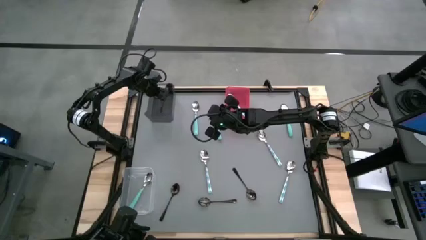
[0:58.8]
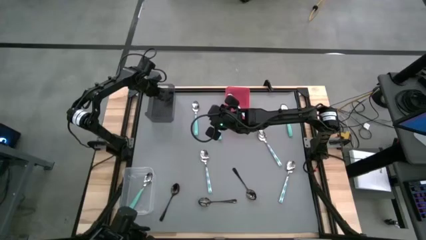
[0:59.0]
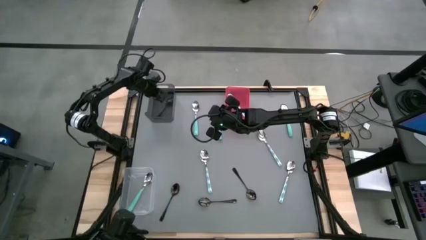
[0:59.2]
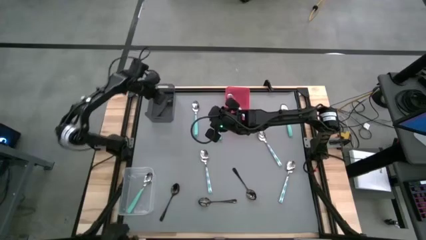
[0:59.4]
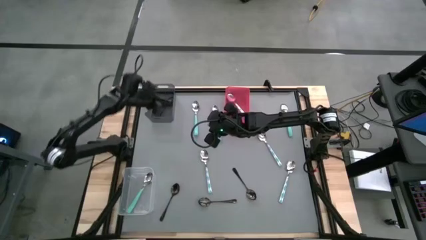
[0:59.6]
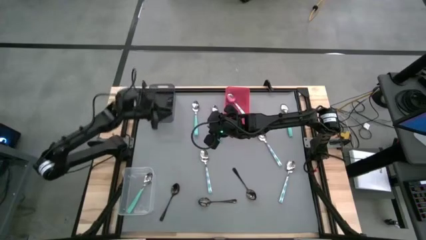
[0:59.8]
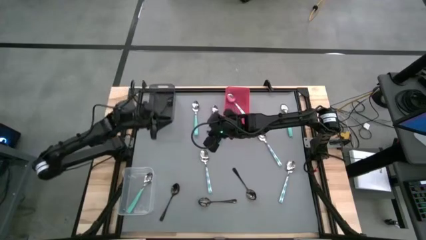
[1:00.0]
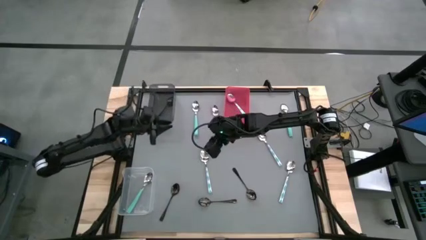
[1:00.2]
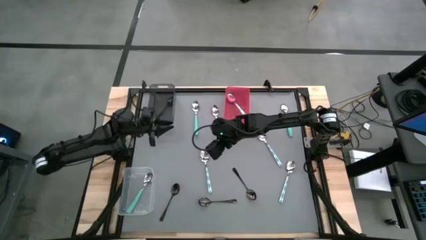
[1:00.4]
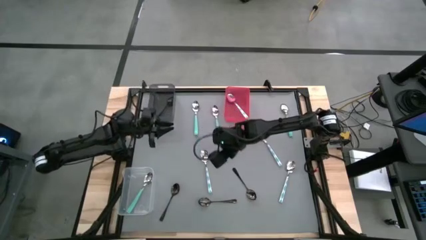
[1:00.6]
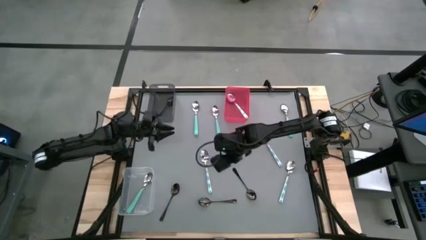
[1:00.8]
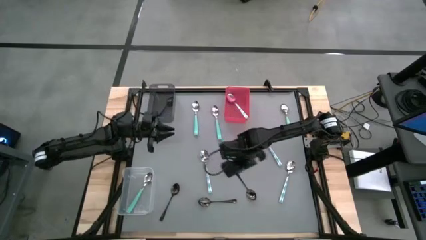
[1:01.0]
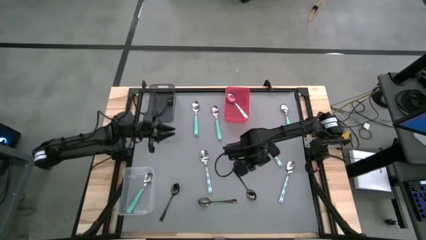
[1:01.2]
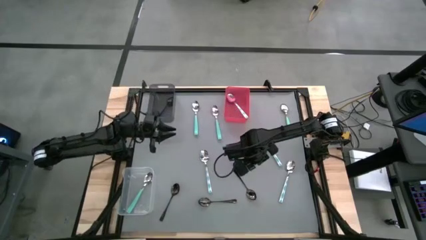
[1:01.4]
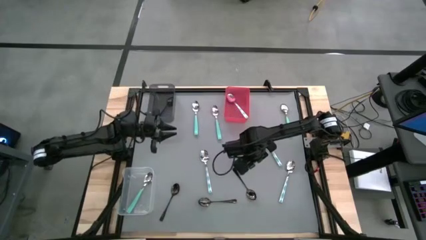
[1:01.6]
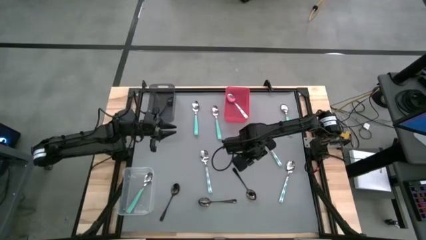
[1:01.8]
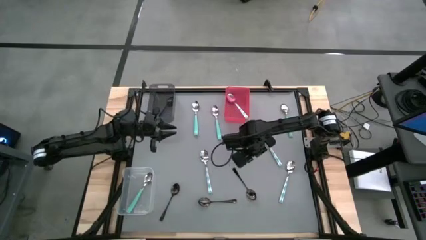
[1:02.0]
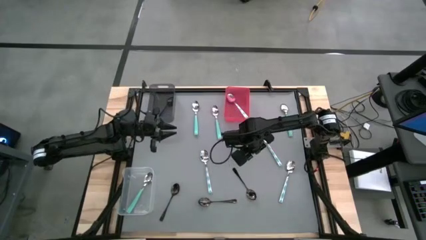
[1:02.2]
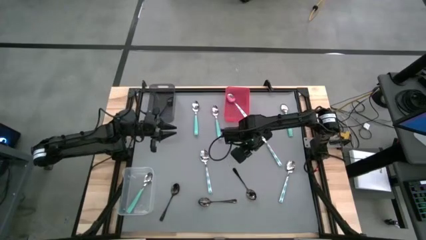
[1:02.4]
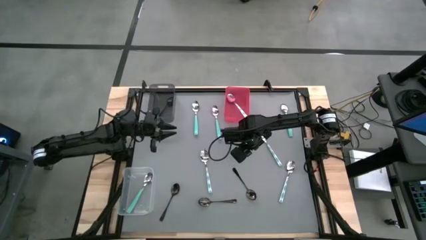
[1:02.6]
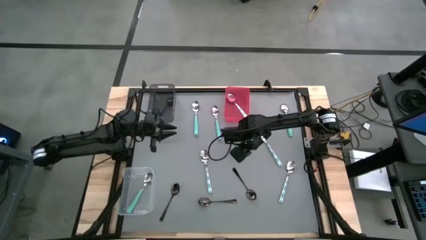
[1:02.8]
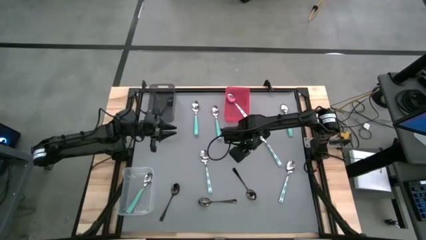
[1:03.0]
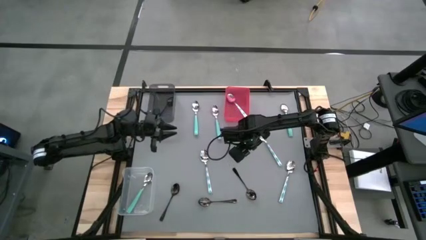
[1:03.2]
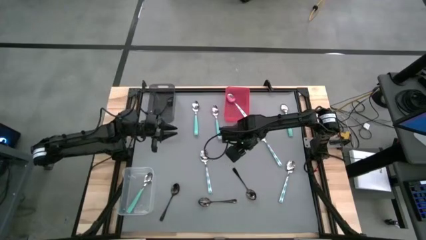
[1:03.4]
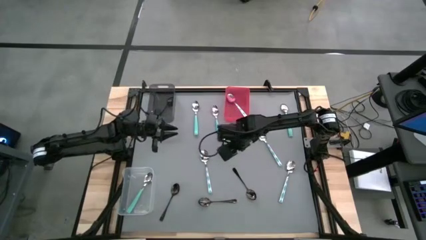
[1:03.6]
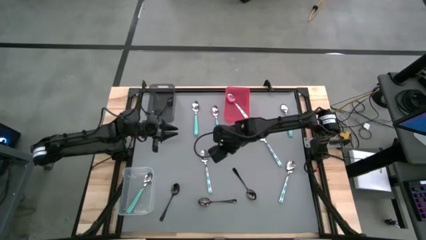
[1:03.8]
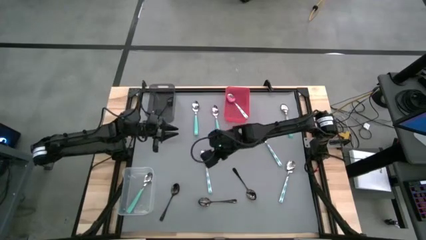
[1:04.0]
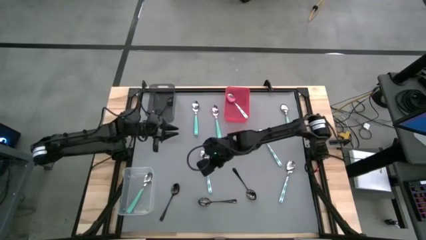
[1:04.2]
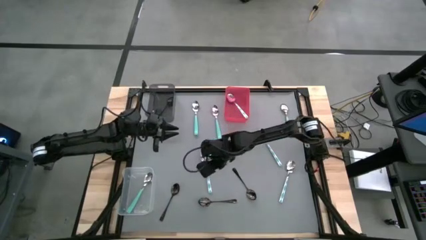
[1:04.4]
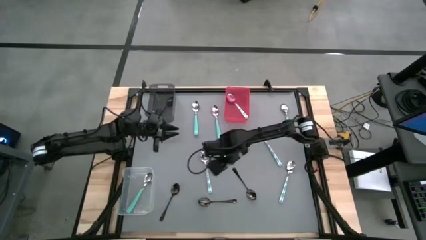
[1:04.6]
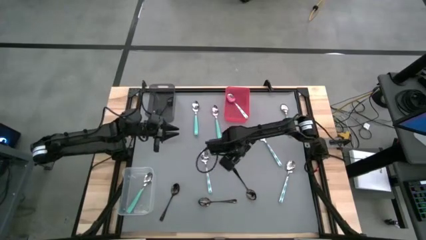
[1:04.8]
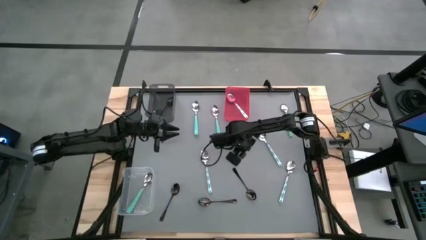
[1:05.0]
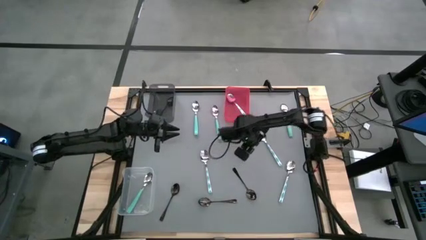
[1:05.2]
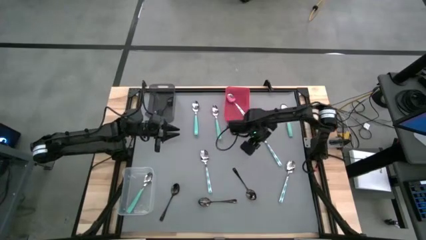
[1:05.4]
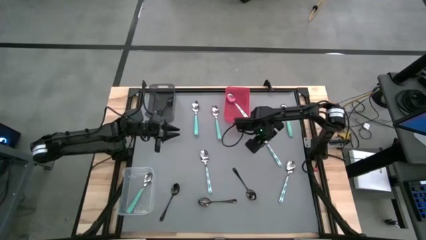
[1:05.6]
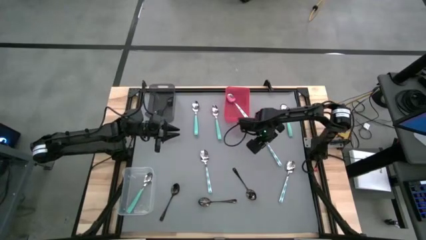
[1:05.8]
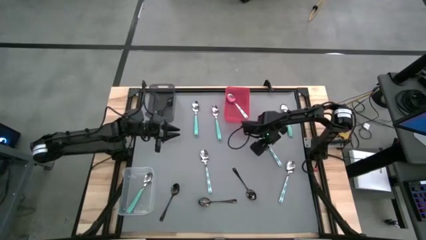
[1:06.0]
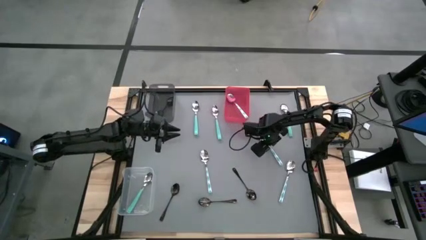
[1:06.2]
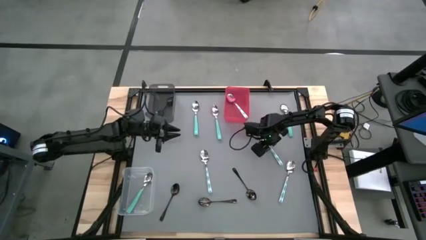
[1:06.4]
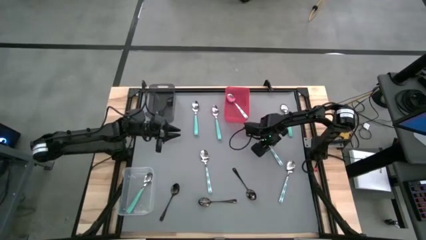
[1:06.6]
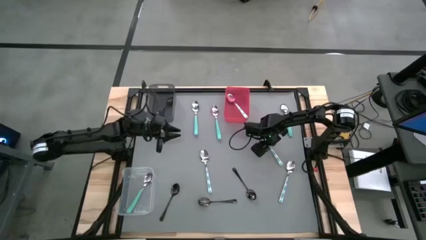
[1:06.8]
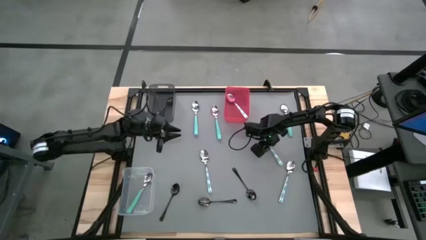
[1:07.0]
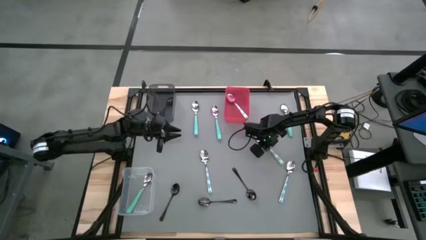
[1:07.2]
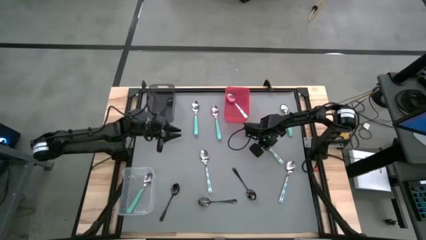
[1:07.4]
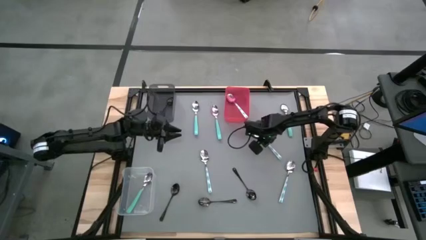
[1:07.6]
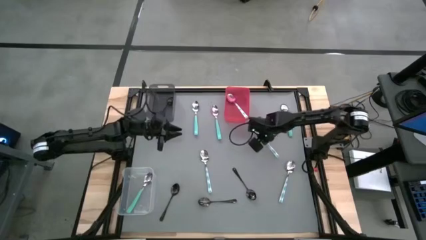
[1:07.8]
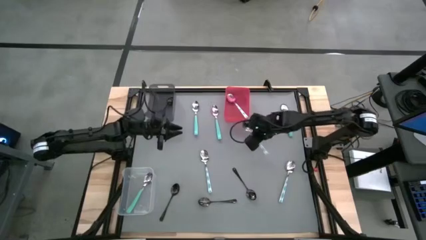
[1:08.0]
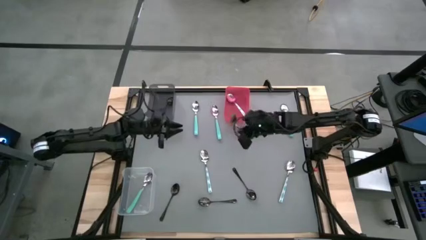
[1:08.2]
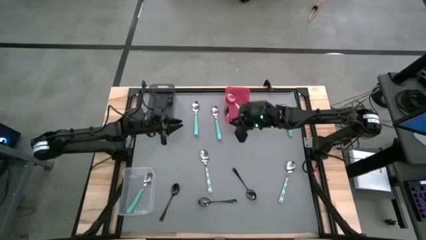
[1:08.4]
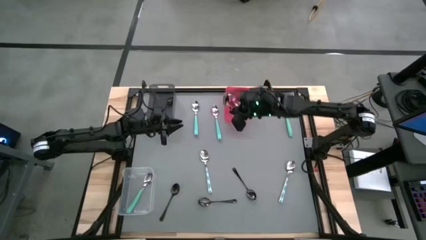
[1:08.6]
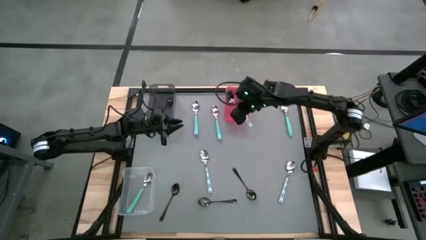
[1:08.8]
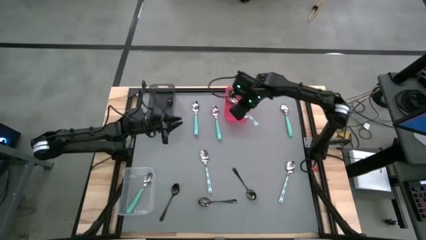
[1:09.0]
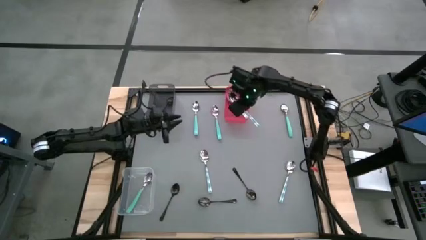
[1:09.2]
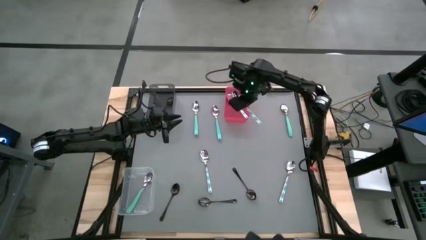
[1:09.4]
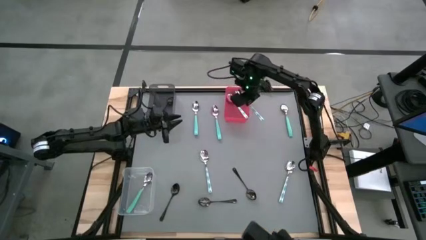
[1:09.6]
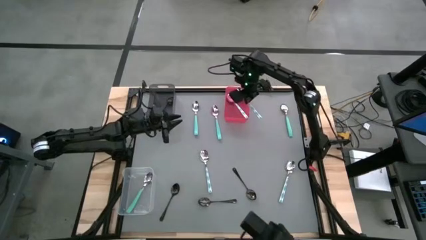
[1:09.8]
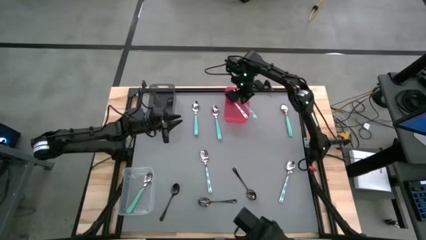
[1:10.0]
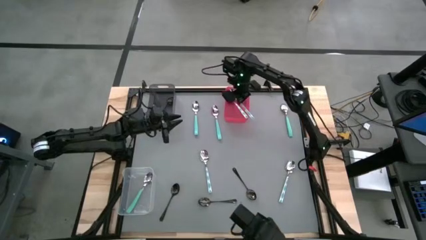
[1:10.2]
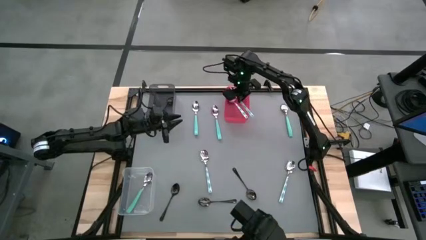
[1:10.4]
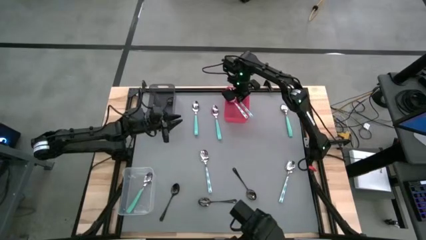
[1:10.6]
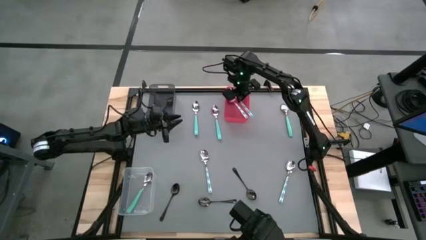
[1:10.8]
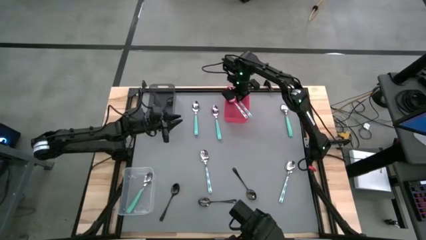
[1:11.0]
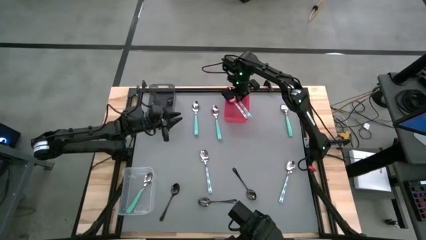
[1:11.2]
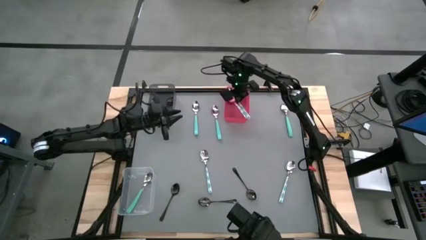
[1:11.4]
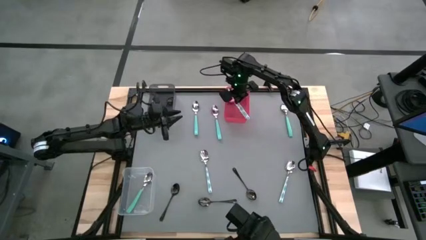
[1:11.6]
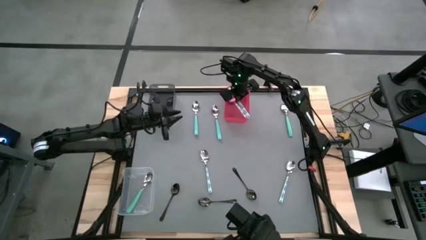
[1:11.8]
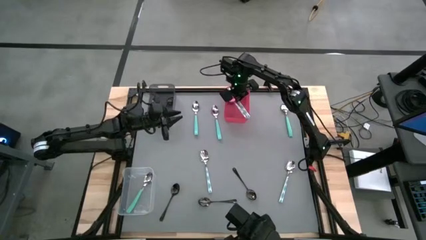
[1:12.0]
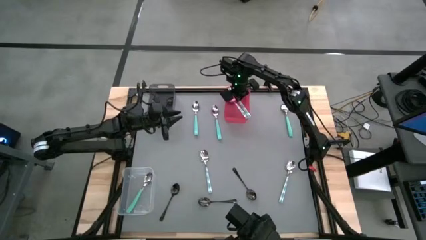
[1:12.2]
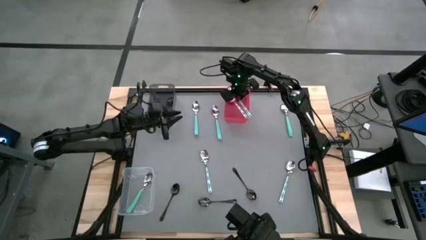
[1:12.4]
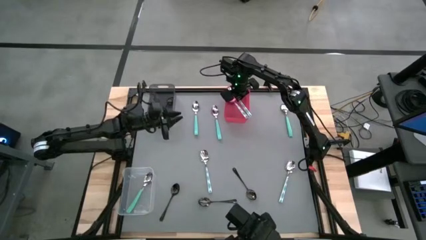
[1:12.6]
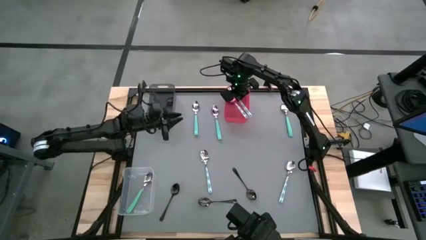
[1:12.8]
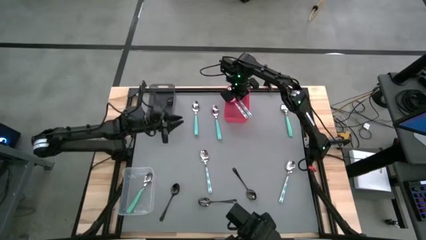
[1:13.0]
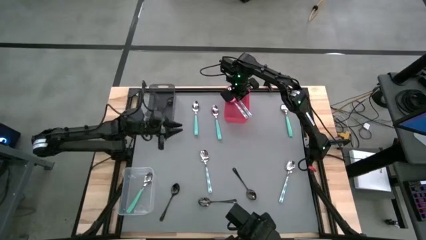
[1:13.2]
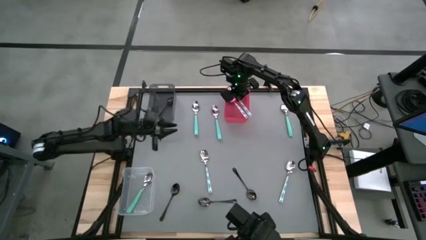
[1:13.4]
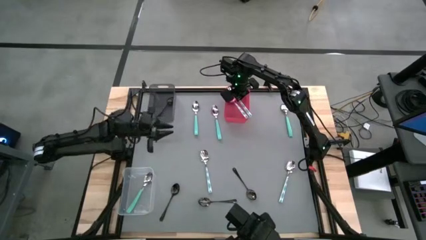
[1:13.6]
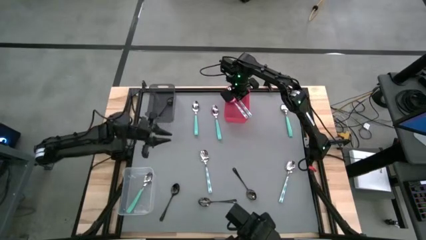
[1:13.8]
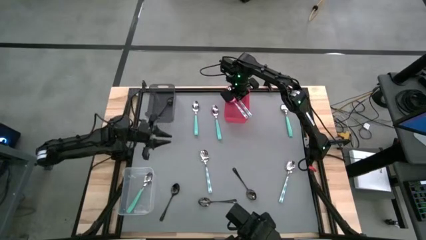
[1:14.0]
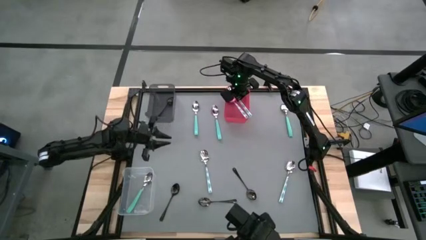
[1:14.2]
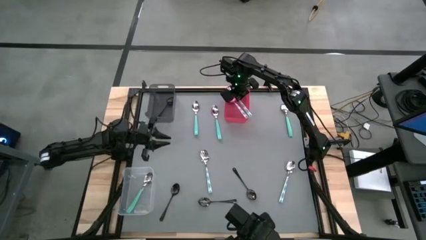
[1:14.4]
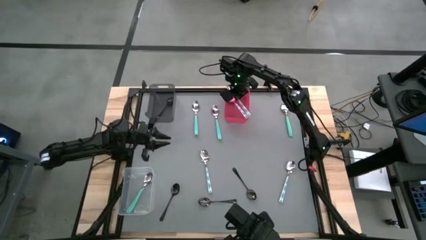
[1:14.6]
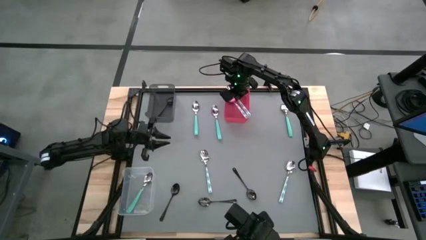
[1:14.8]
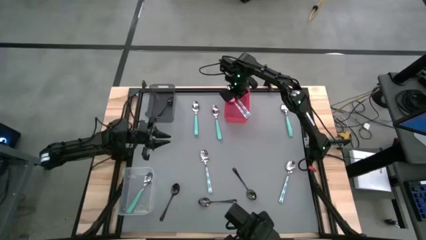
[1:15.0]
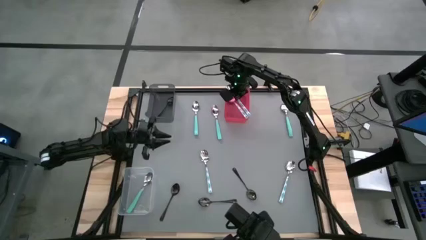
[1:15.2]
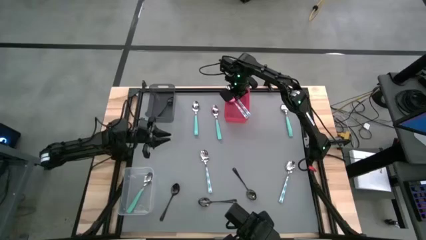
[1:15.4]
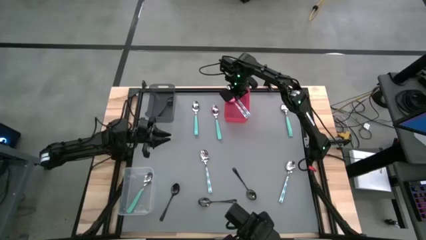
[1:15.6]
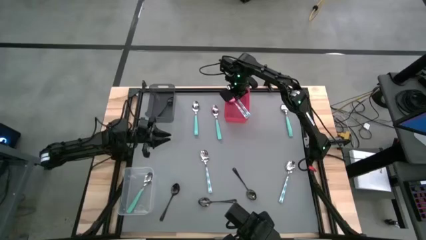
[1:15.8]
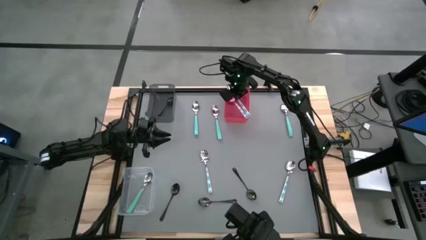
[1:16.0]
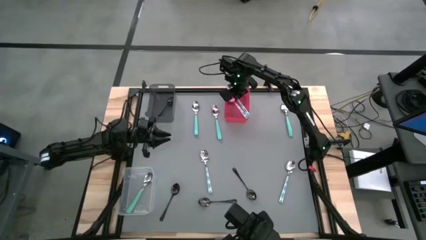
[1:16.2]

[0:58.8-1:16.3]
Task: Sort silverware by color (type)
Put the white green spoon into the red bin
